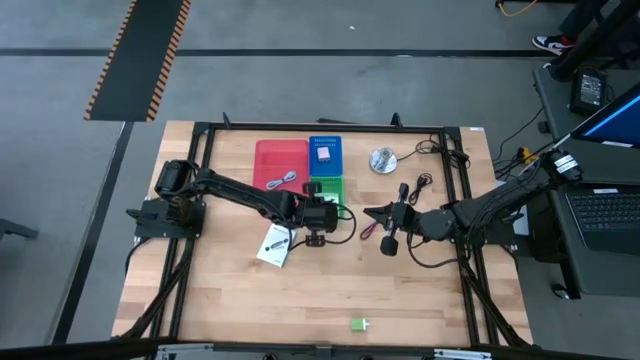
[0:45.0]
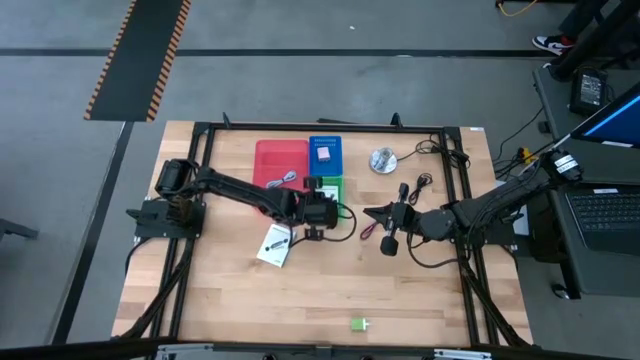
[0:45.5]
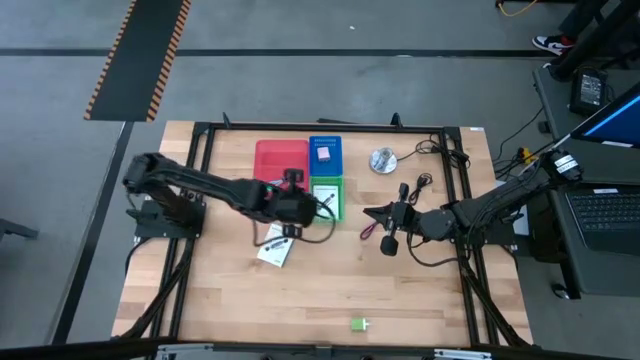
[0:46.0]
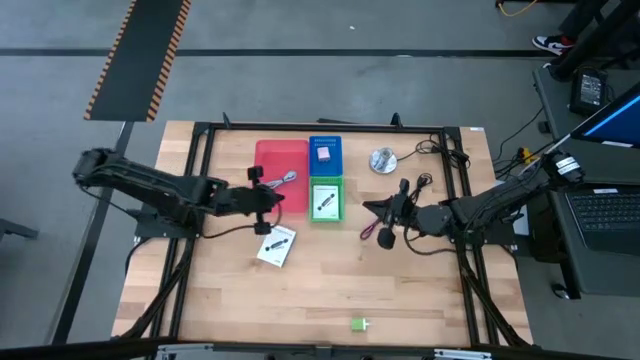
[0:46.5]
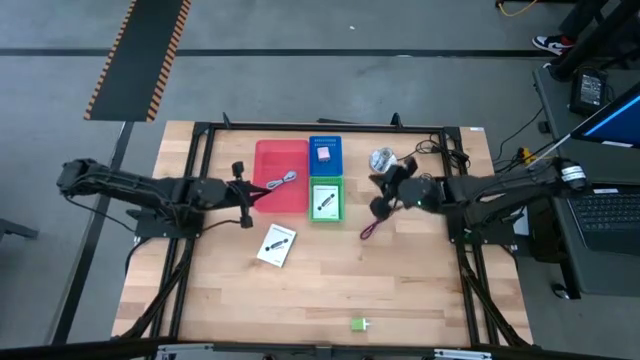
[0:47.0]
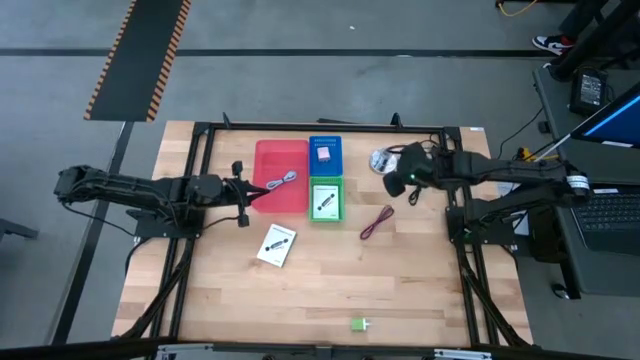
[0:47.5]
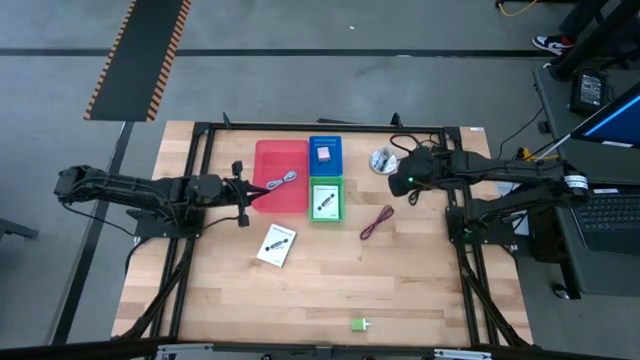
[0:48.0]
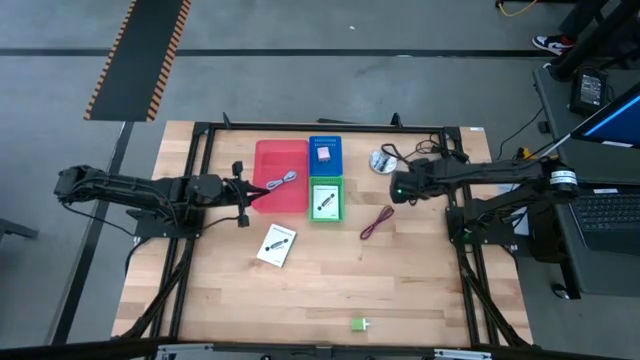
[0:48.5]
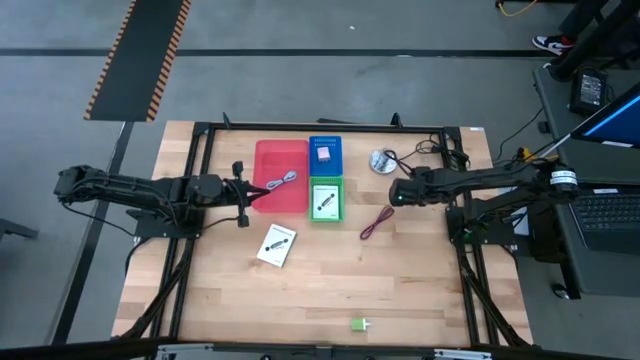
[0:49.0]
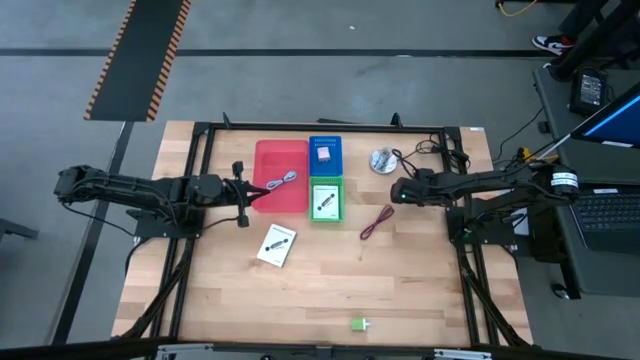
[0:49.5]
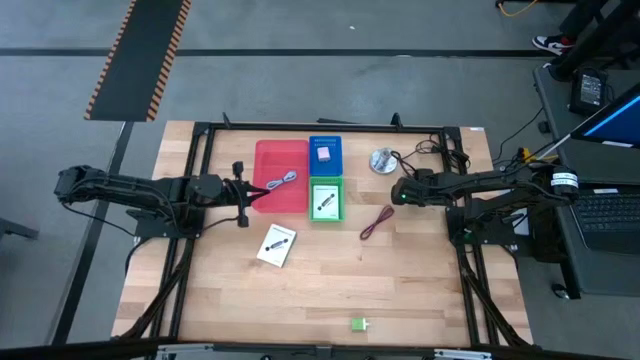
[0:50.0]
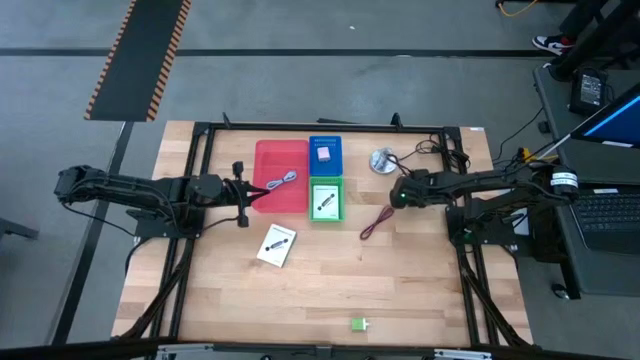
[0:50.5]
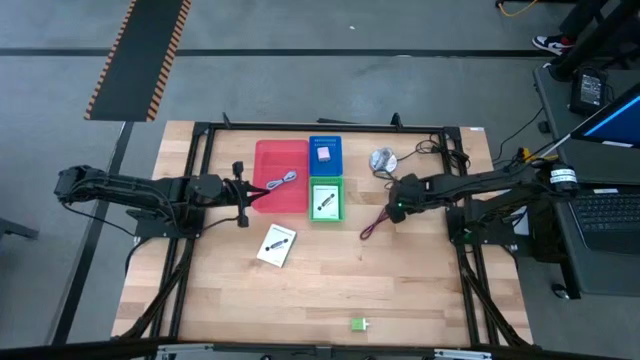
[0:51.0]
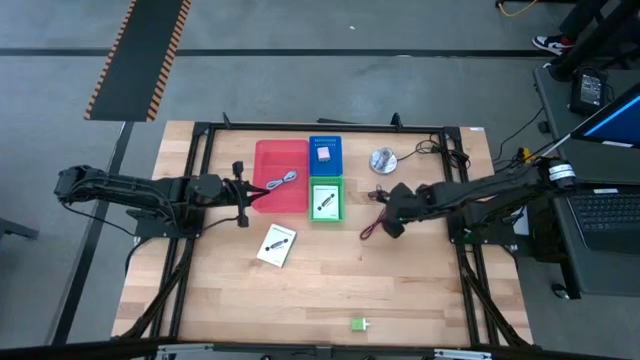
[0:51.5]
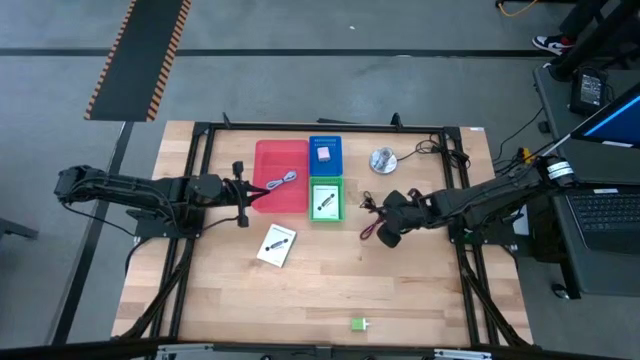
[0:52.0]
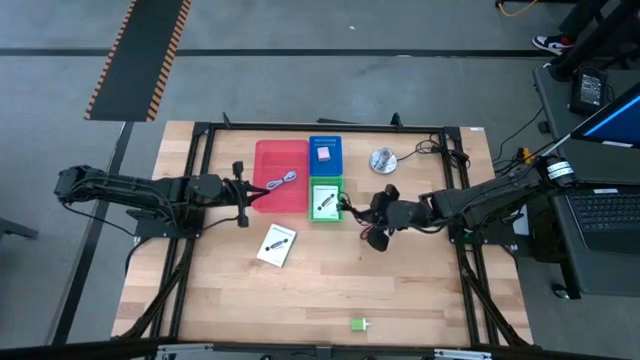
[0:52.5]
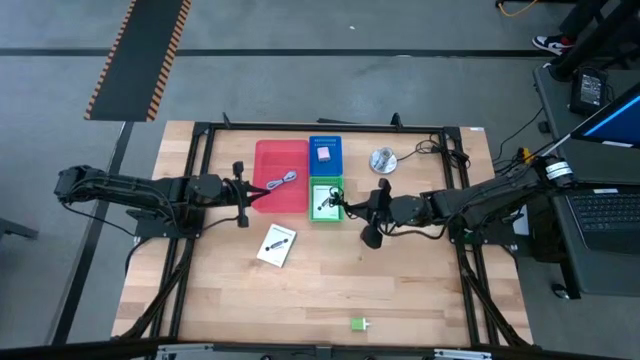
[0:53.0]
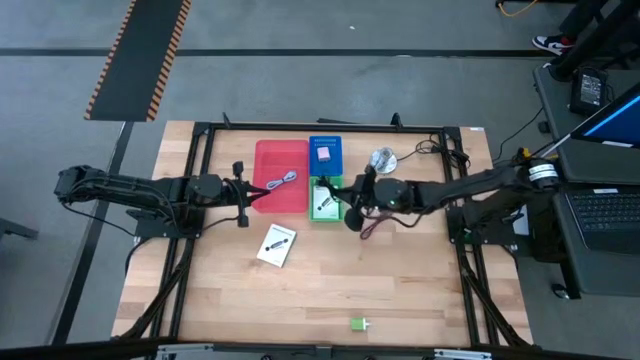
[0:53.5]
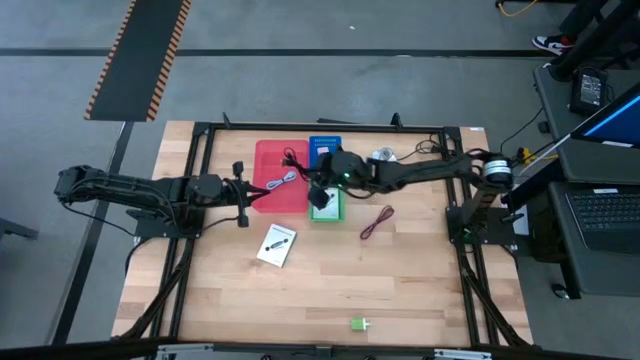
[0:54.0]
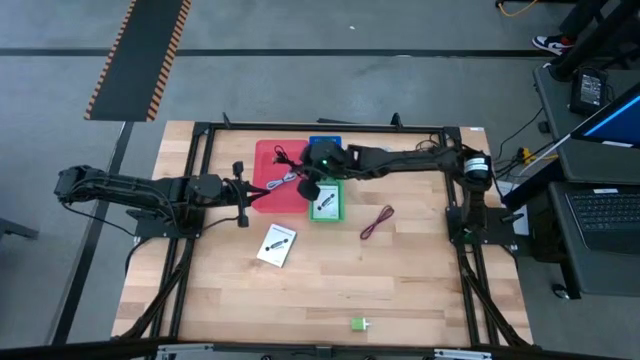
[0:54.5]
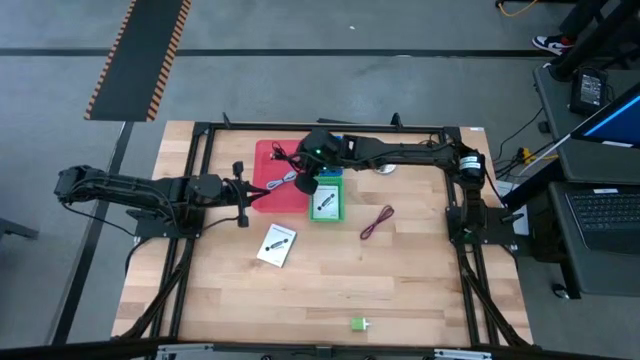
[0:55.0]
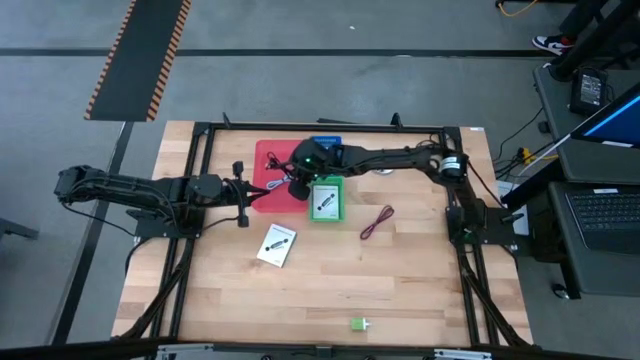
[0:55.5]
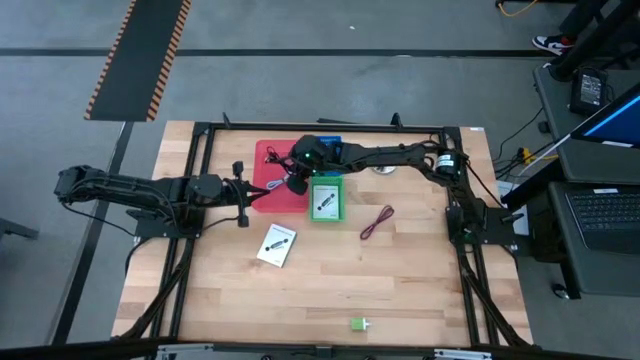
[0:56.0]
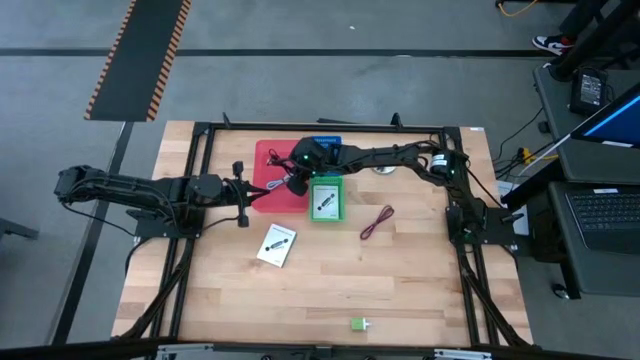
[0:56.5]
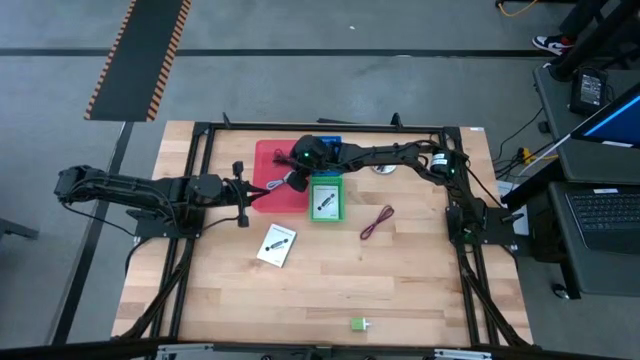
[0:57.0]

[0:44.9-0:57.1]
Task: Pick and place items into bin
Put the black charger cable into the red bin

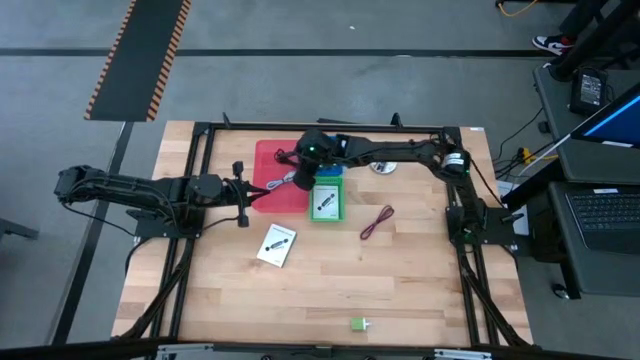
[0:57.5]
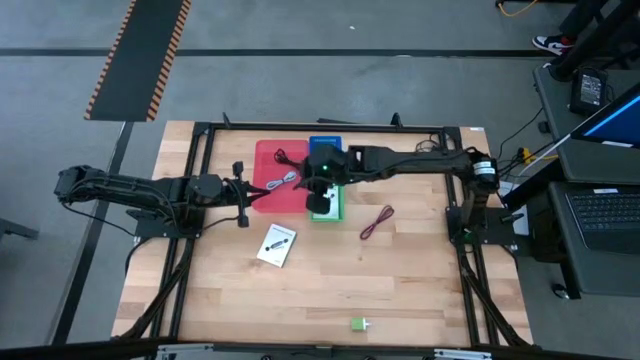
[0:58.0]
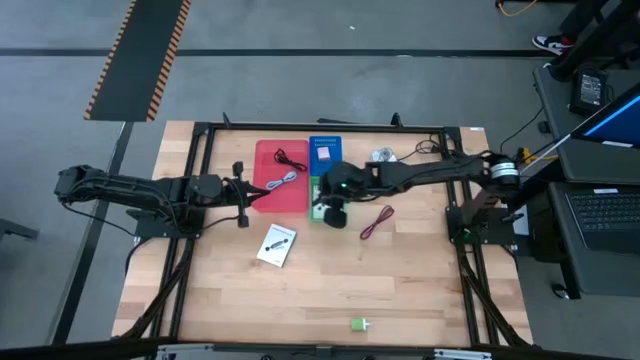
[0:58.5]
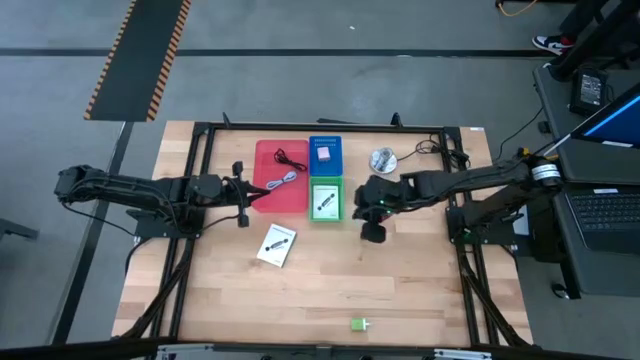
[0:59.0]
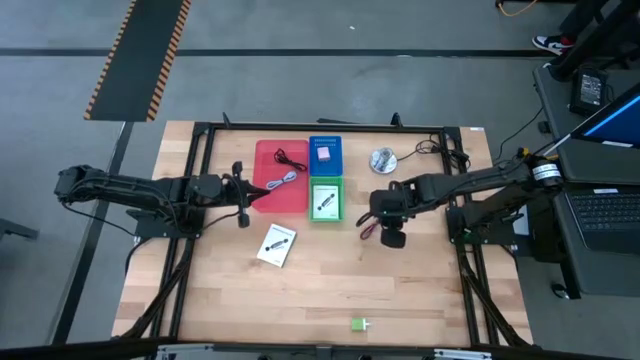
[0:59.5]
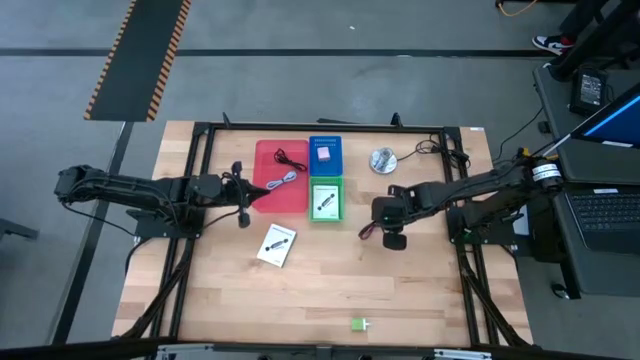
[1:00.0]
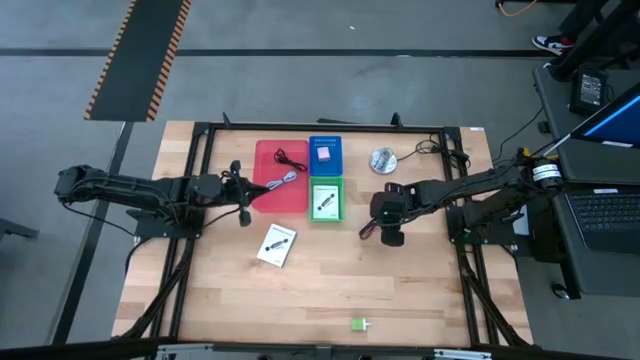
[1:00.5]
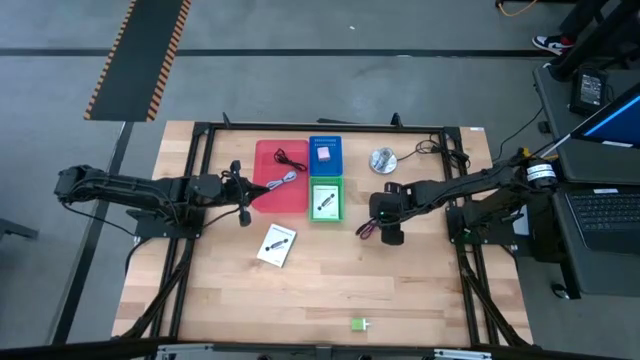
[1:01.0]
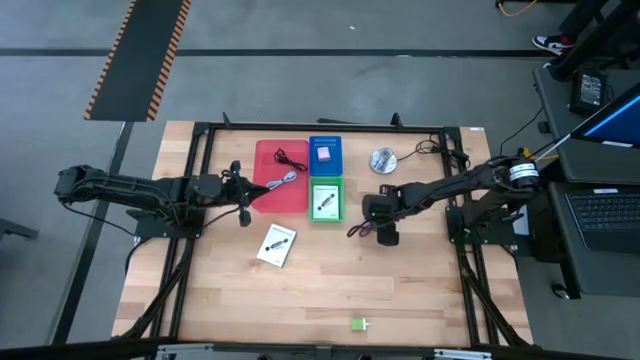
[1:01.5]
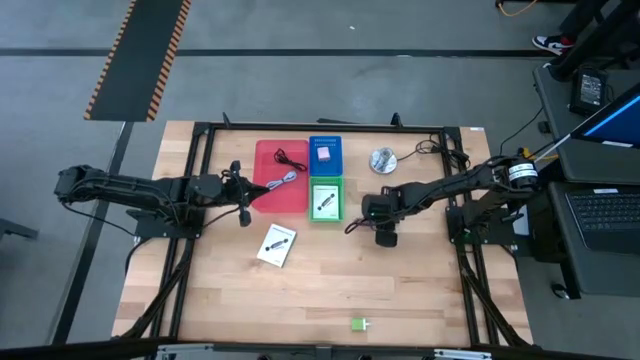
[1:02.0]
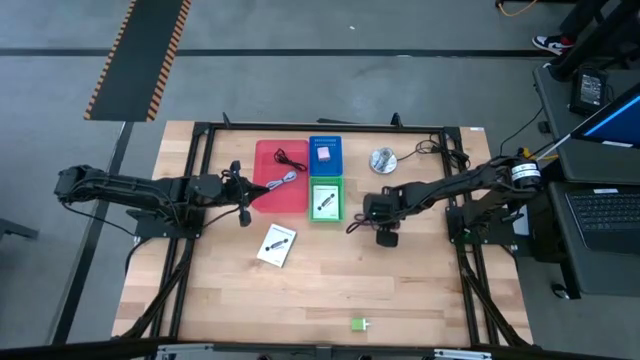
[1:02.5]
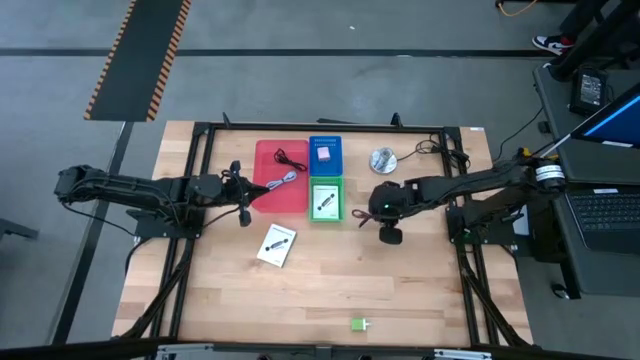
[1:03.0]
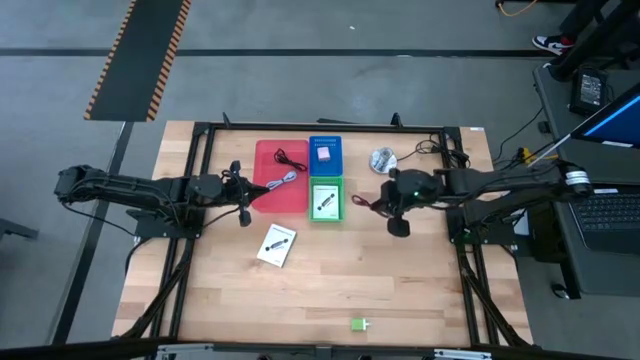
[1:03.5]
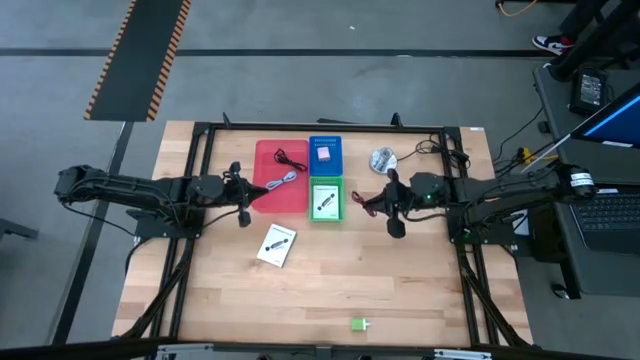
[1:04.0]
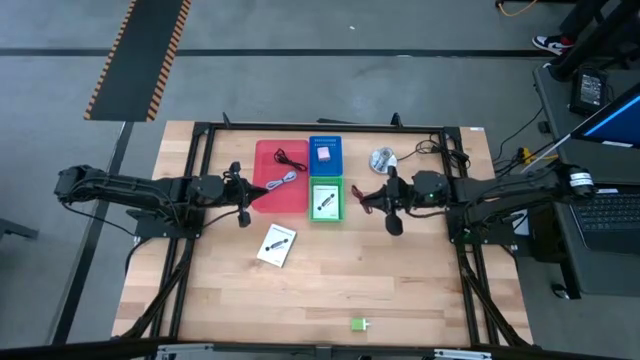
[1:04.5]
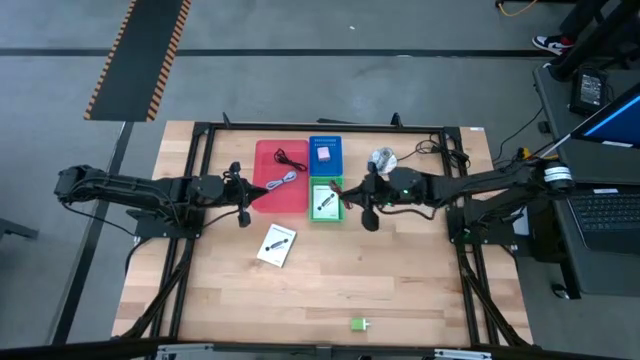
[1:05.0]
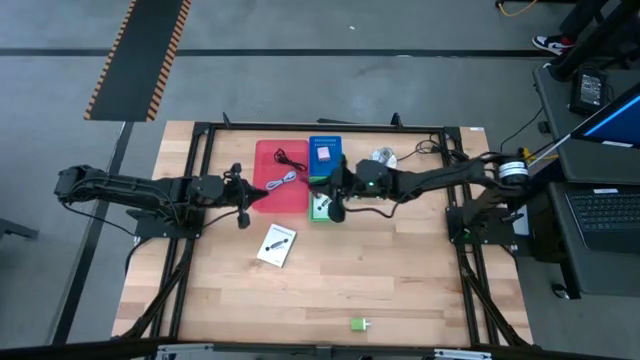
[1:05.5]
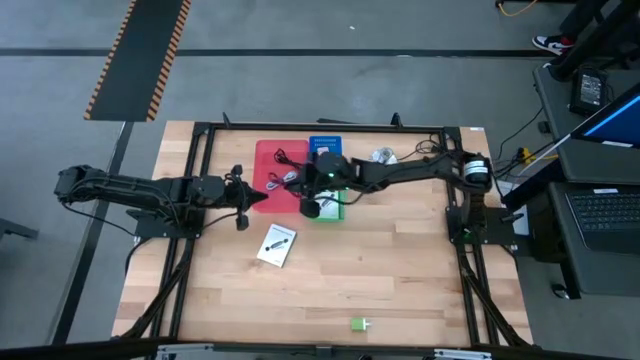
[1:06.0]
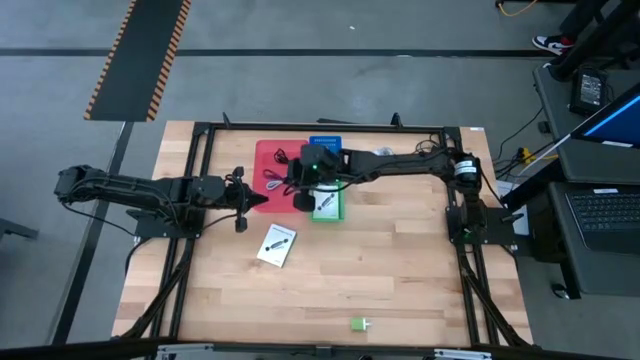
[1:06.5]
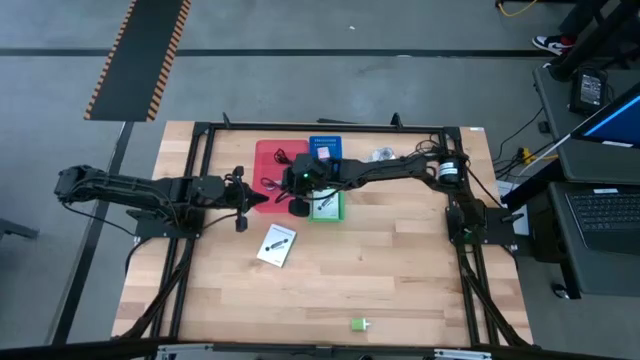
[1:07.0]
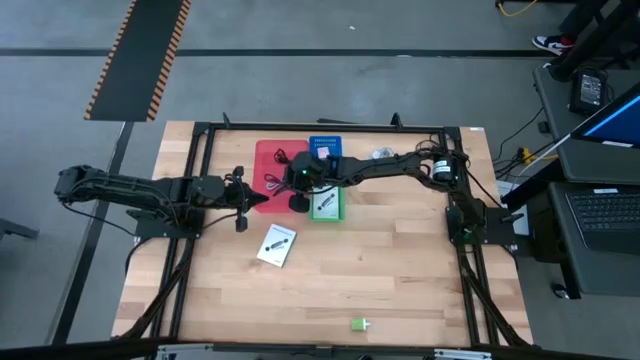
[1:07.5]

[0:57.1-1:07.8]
Put the red charger cable into the red bin
